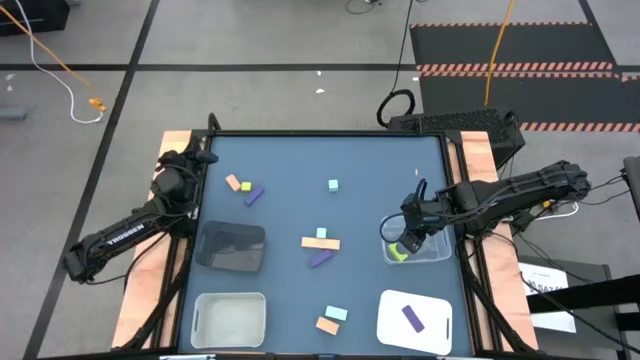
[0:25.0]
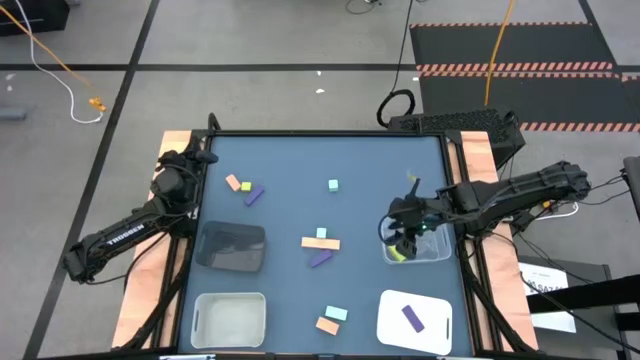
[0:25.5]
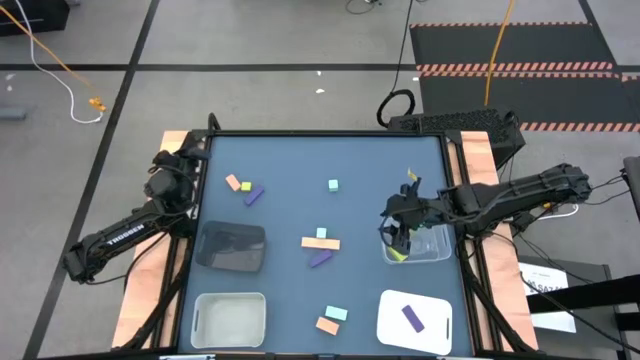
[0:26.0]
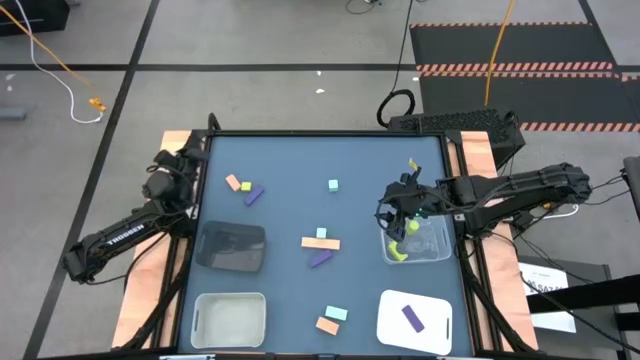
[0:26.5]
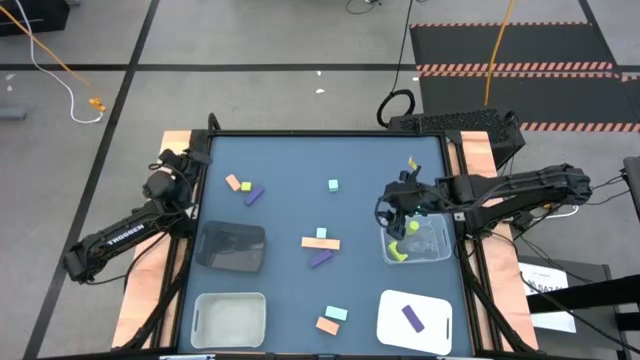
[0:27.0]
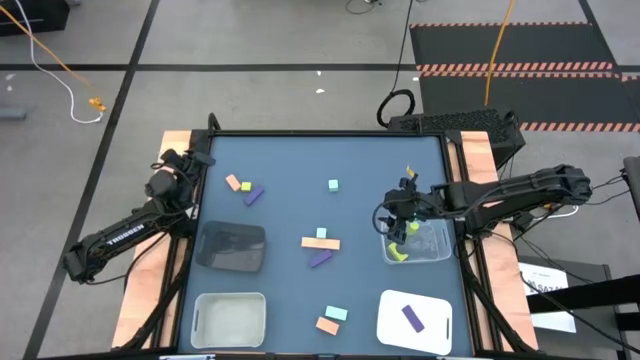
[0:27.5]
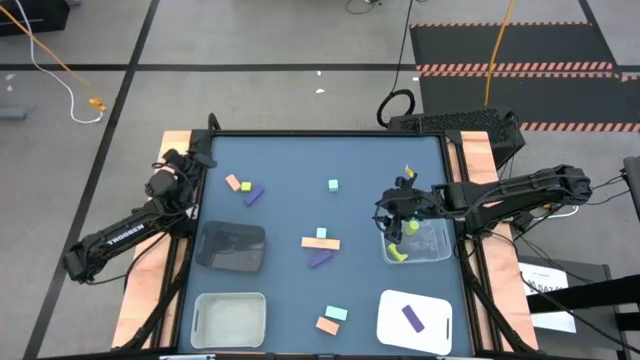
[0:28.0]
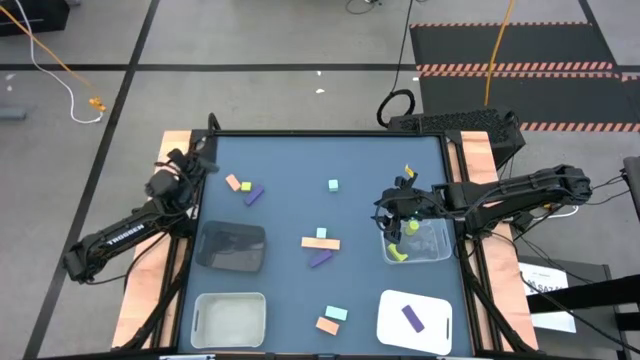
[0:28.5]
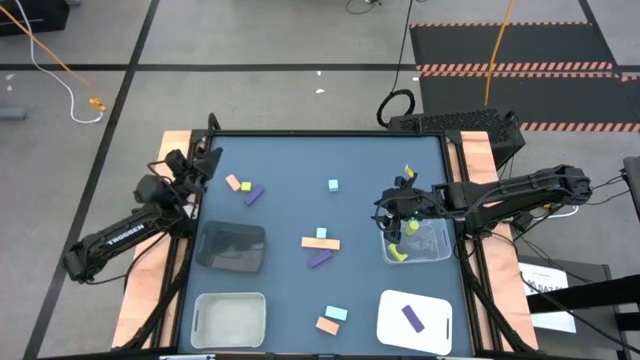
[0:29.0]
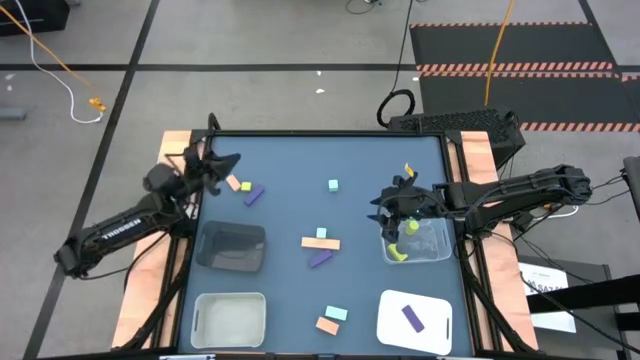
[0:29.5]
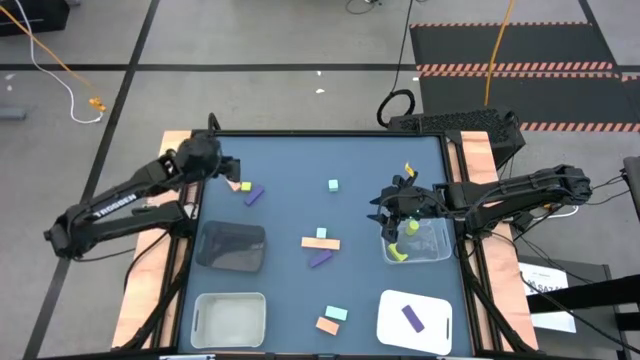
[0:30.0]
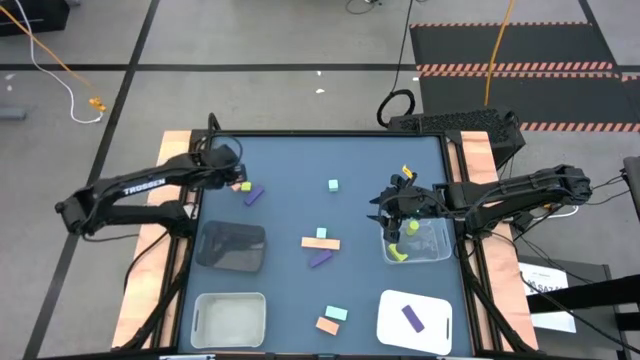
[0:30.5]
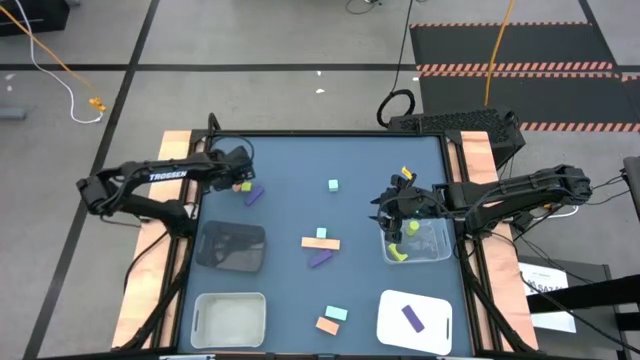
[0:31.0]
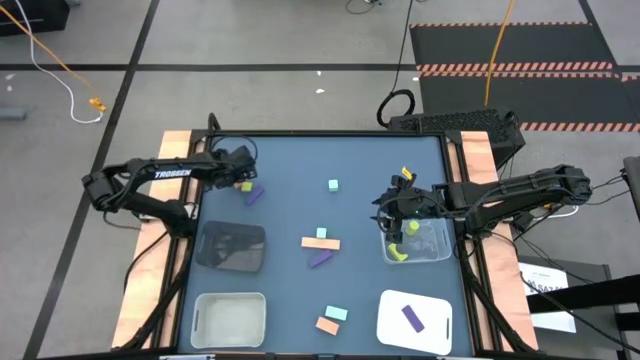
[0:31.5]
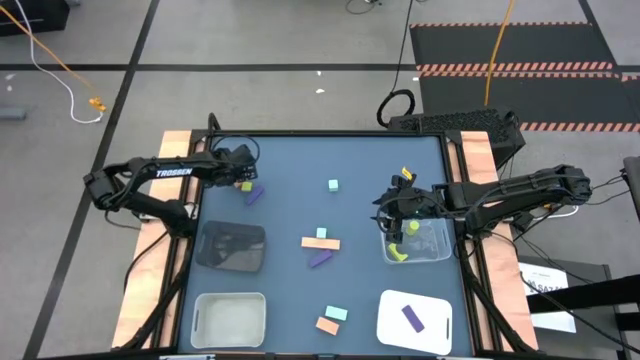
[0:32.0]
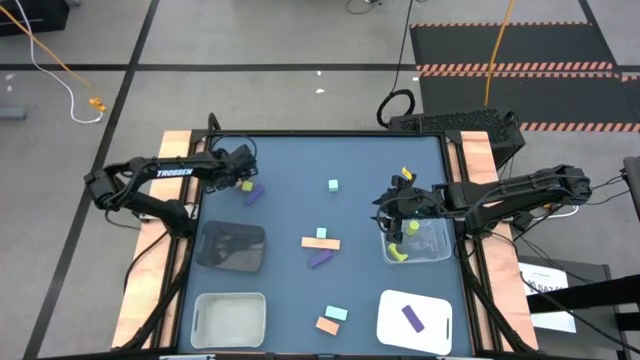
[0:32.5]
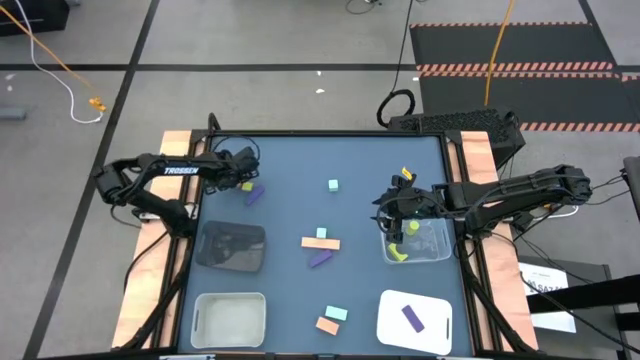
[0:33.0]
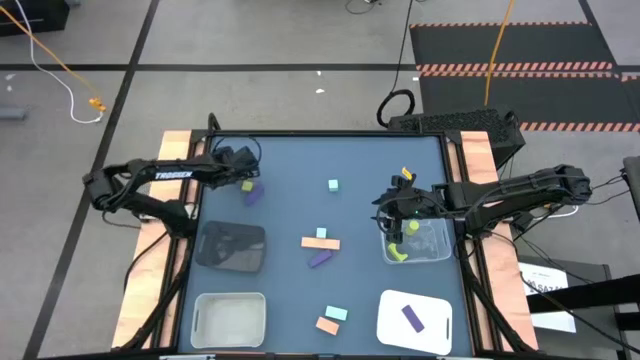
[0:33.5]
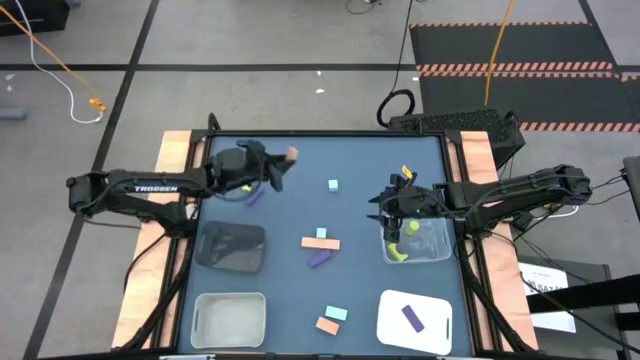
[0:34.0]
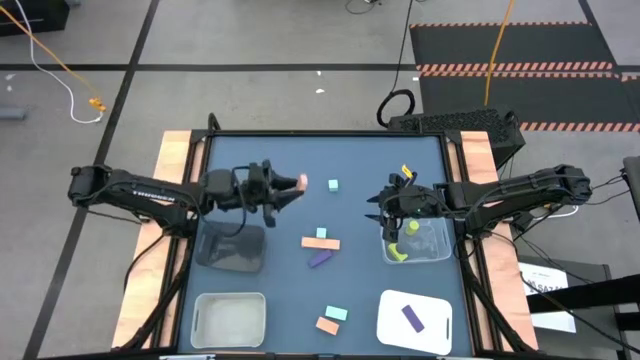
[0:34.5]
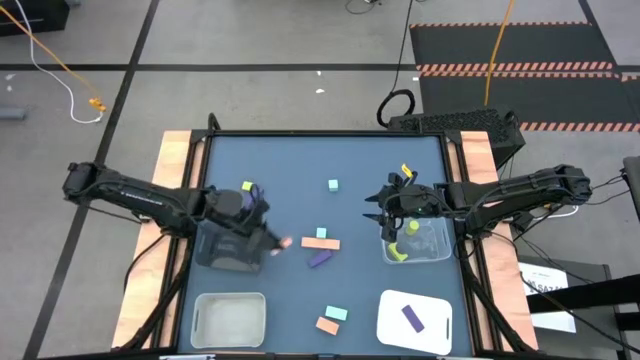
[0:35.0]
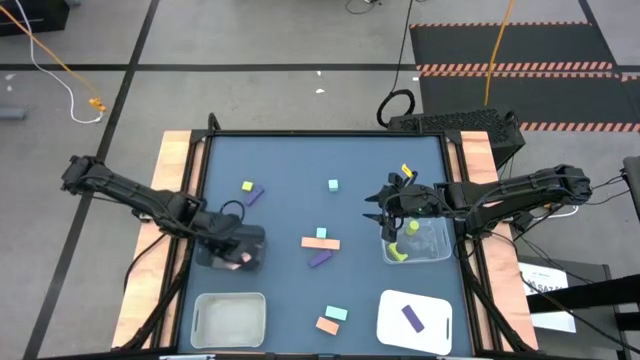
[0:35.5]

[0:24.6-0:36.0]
Task: Sort & place blocks by color
Put the top brown block into the black bin

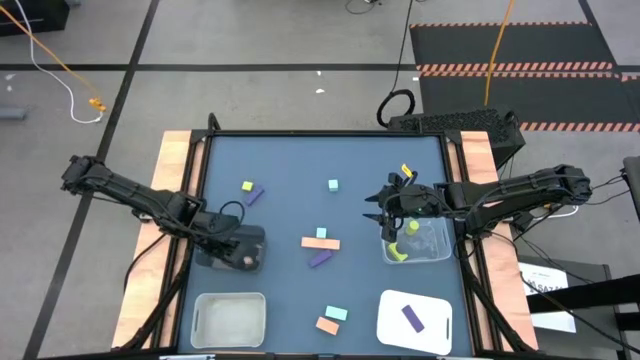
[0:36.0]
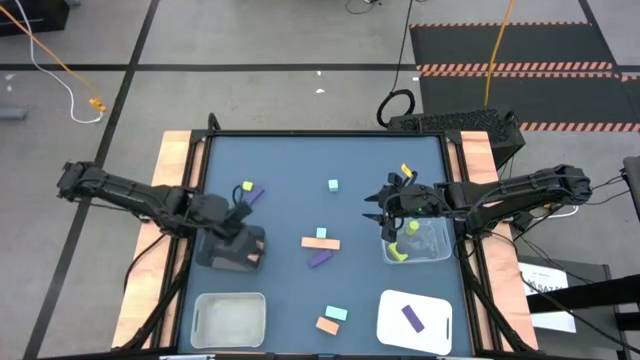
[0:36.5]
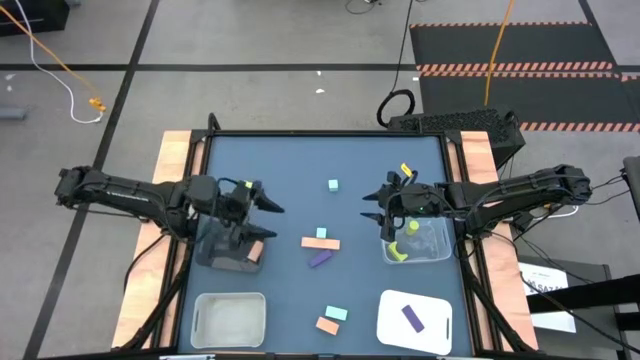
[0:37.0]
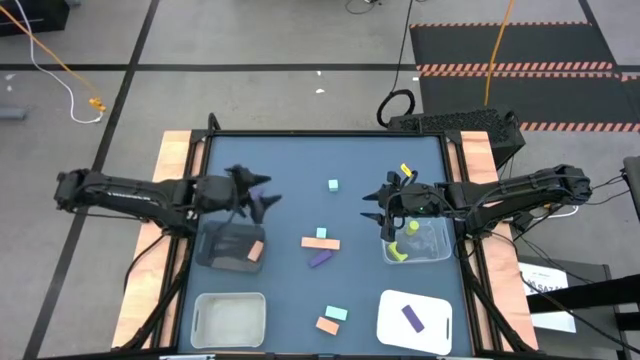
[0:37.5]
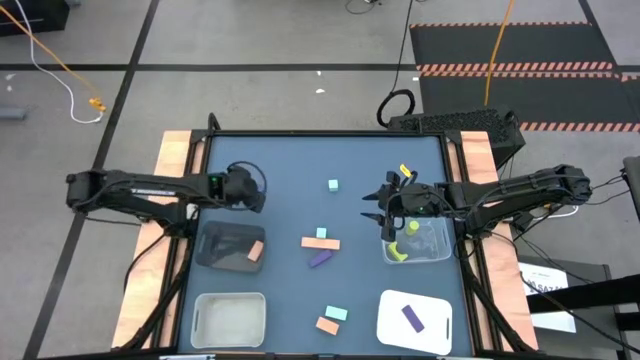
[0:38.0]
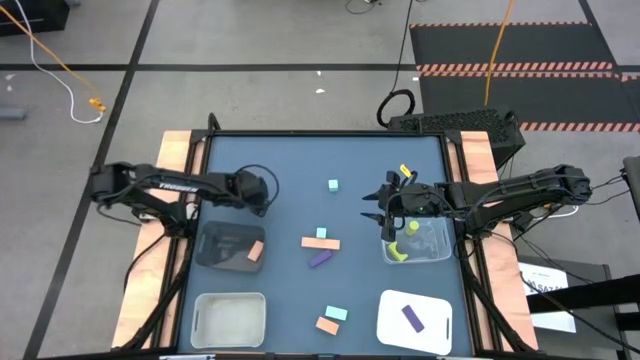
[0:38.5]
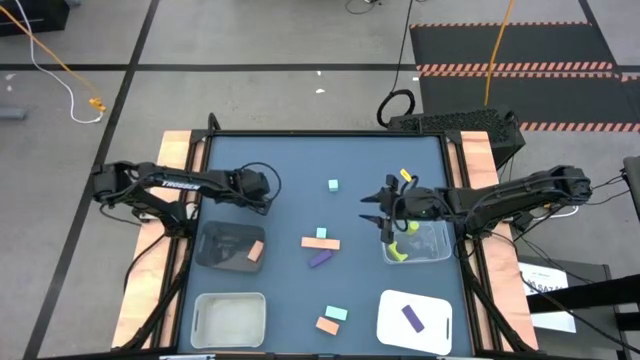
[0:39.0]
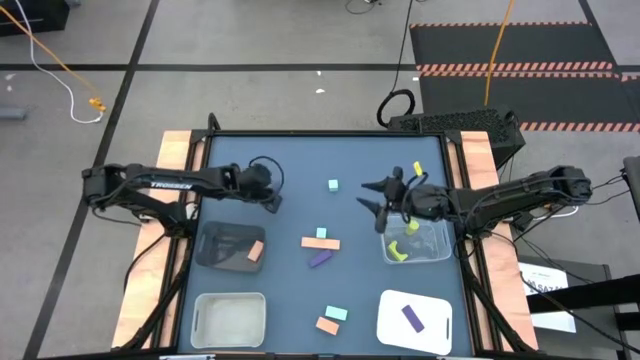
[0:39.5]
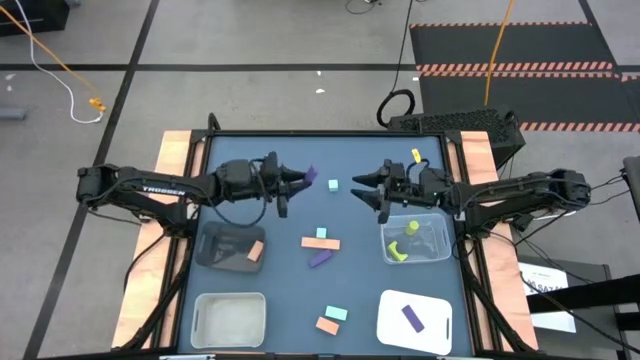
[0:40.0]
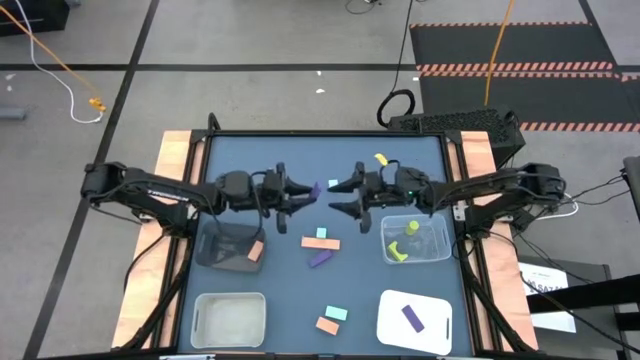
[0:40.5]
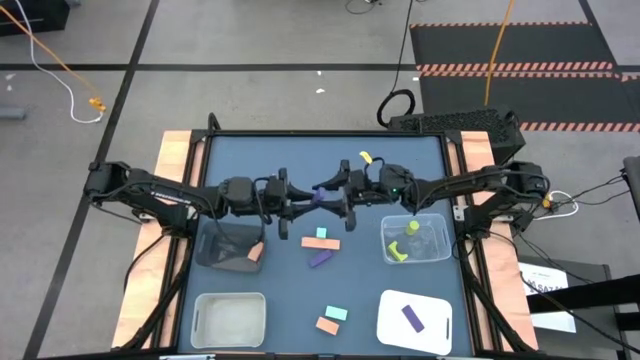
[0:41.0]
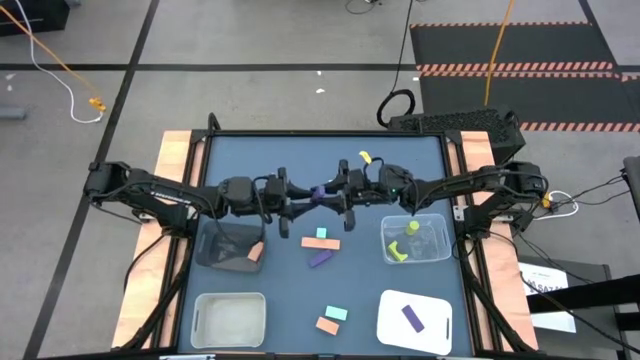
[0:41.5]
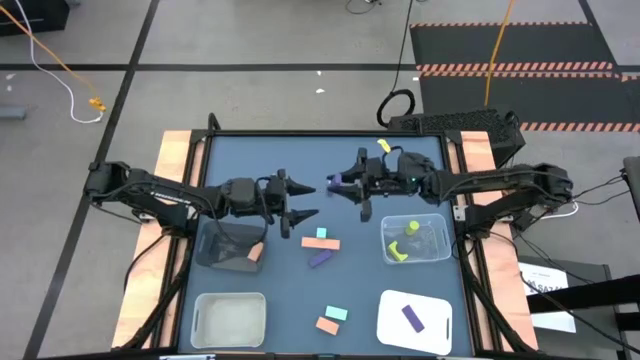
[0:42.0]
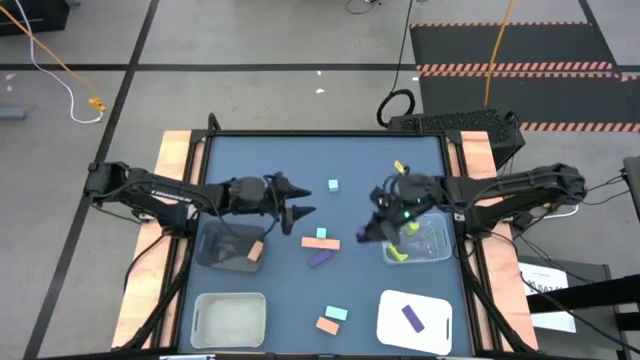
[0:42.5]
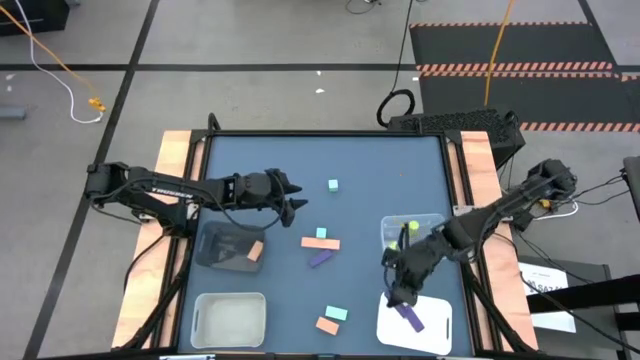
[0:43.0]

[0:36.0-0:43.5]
Put the top violet block into the white bin

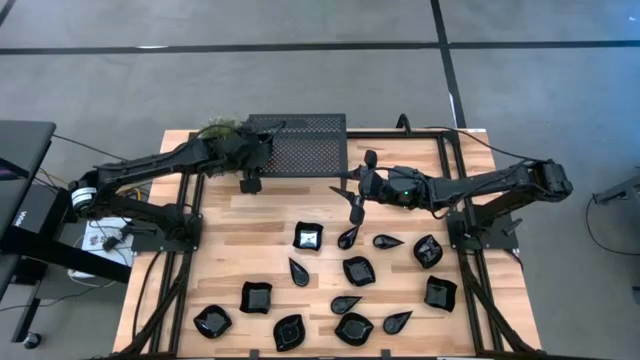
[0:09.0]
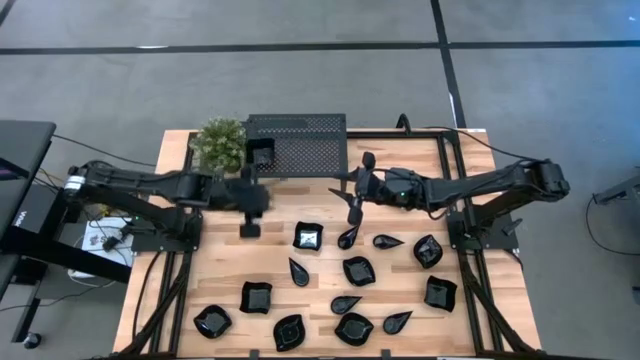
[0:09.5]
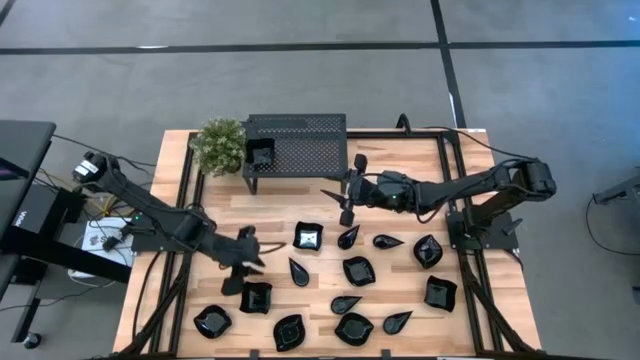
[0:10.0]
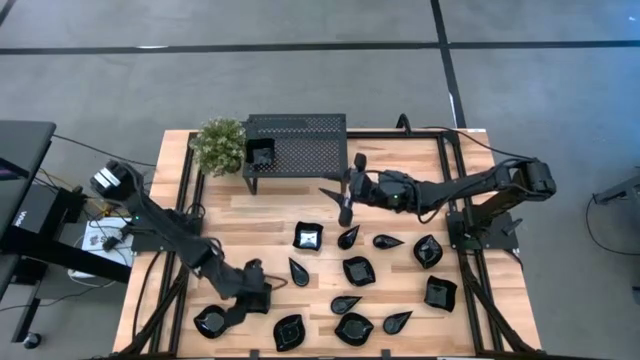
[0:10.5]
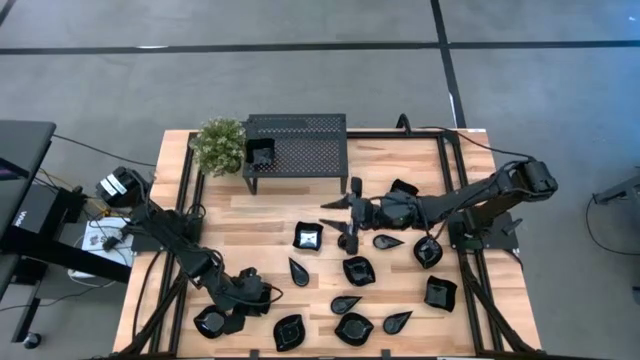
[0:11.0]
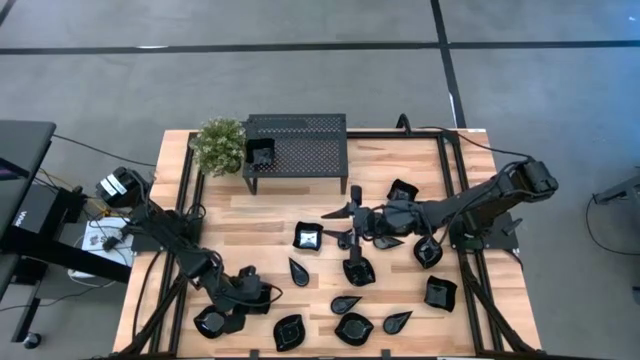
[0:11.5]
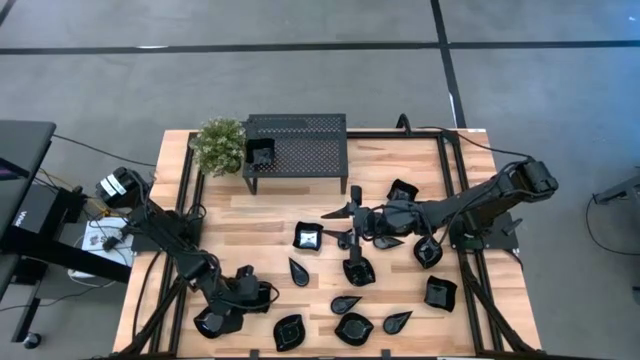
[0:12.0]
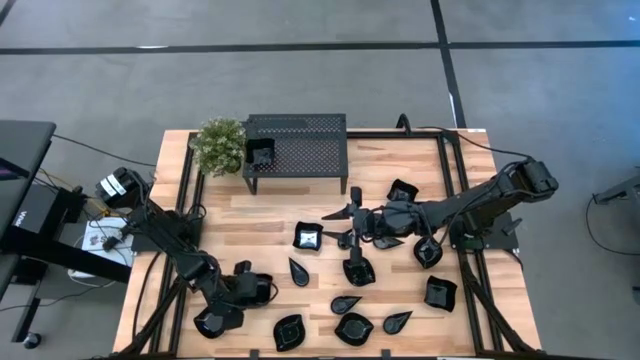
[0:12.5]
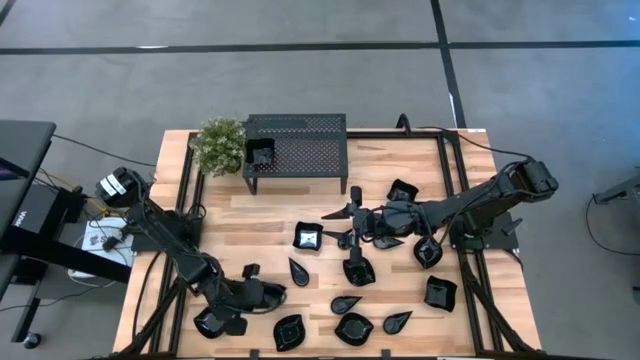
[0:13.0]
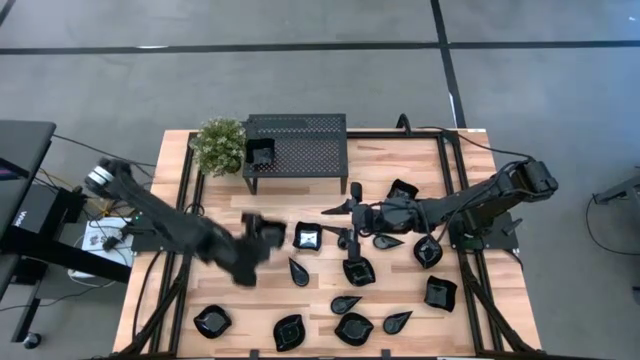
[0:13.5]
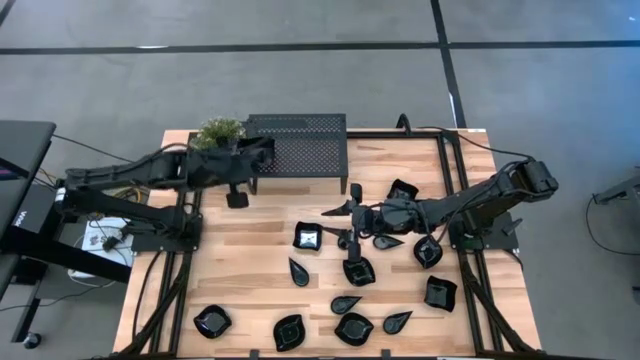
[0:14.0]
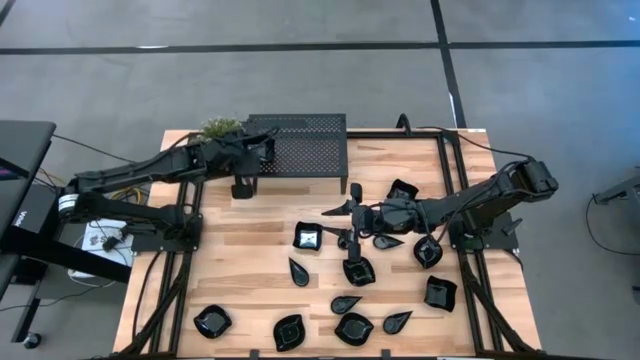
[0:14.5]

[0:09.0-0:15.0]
Task: Pick & Place Mini shaped plates
Stack the distorted square plate on top of the distorted square plate on the shelf
